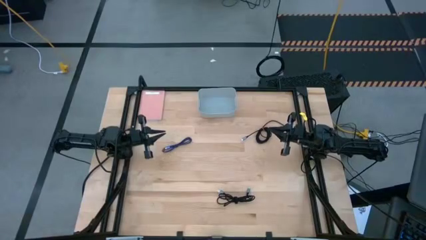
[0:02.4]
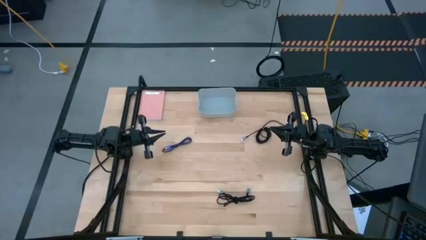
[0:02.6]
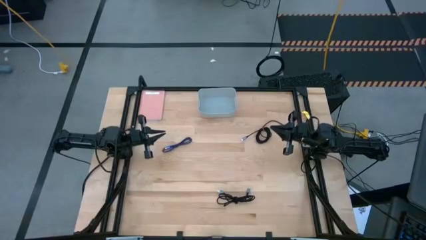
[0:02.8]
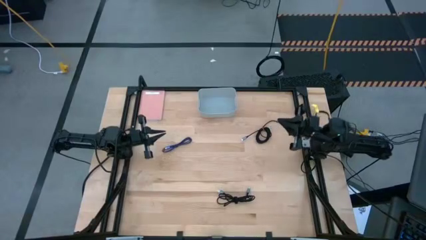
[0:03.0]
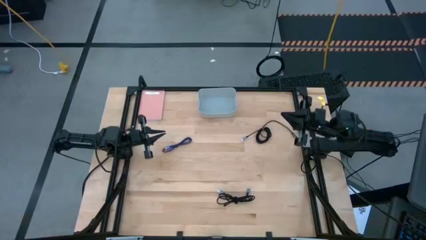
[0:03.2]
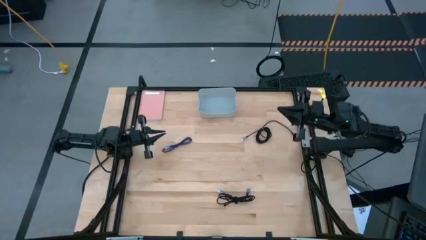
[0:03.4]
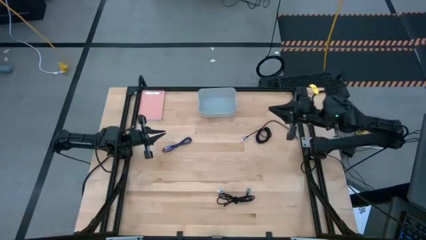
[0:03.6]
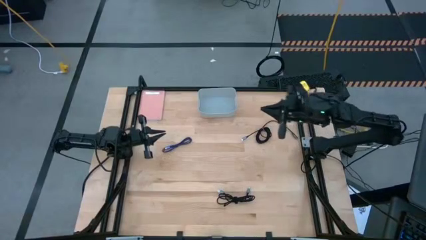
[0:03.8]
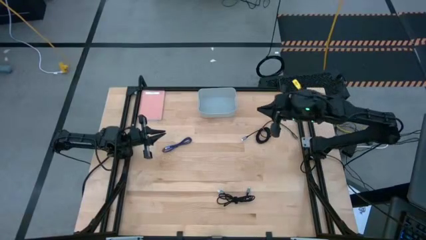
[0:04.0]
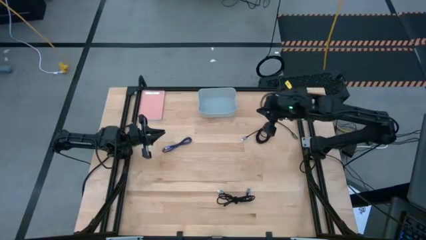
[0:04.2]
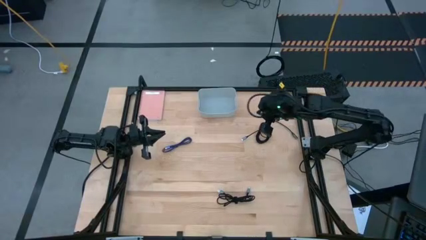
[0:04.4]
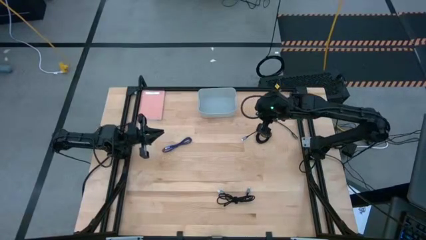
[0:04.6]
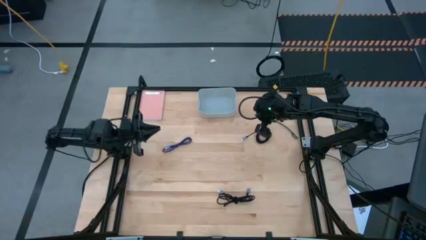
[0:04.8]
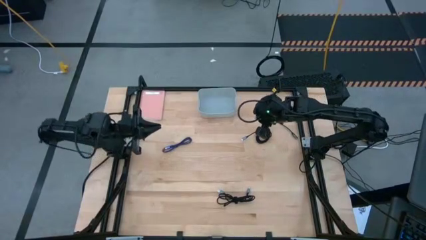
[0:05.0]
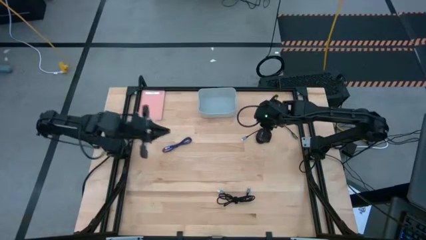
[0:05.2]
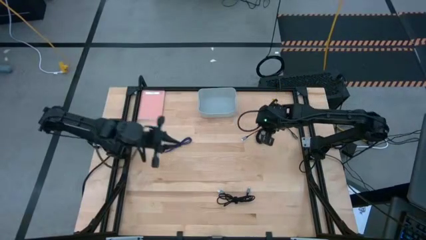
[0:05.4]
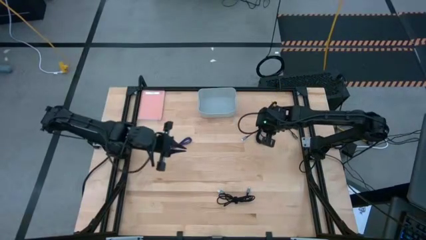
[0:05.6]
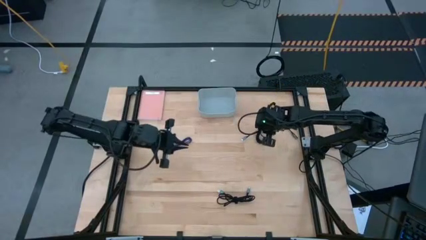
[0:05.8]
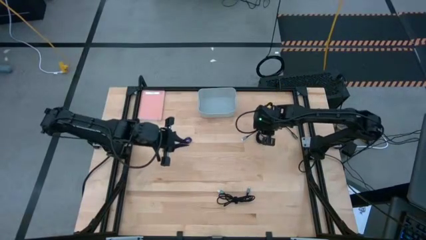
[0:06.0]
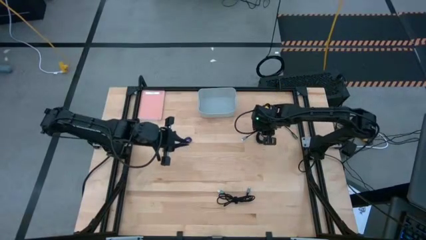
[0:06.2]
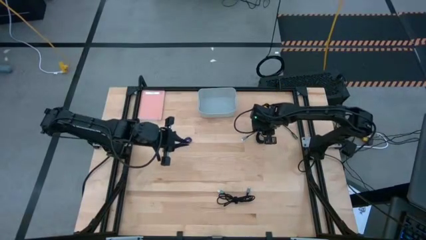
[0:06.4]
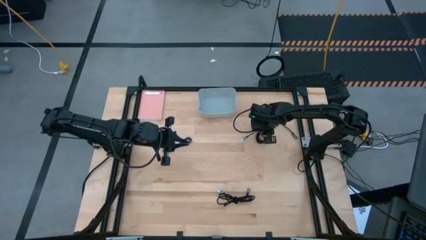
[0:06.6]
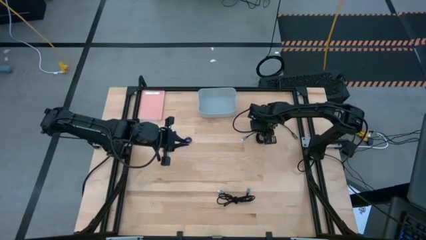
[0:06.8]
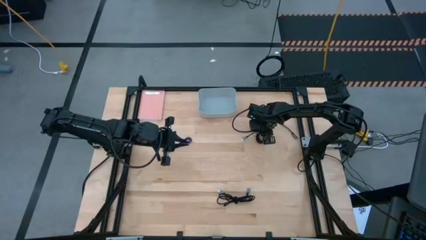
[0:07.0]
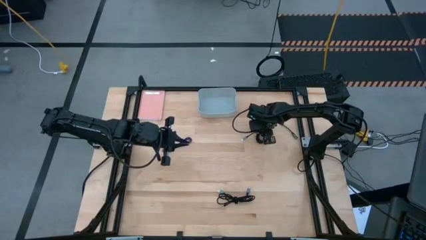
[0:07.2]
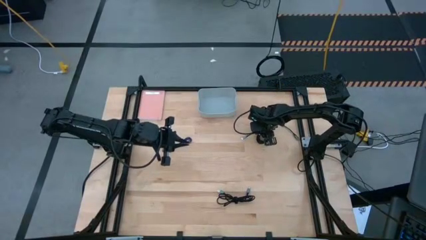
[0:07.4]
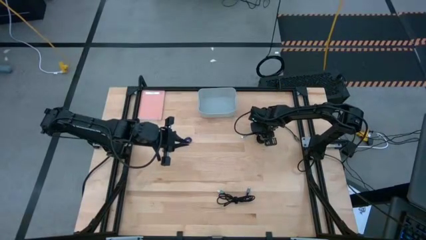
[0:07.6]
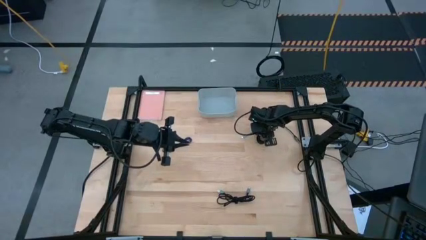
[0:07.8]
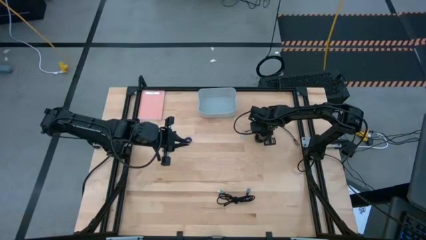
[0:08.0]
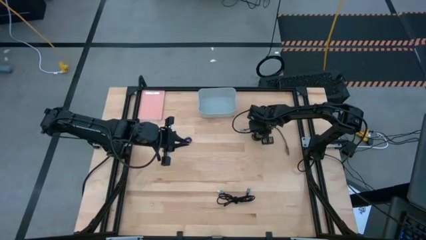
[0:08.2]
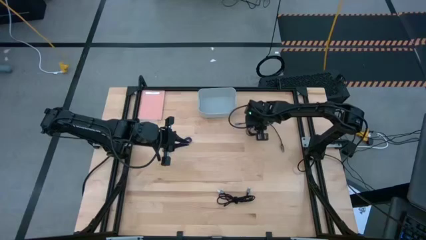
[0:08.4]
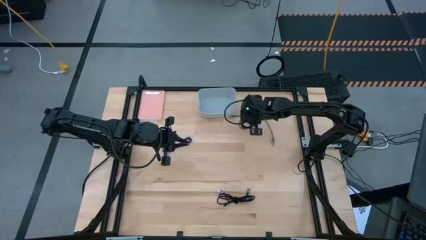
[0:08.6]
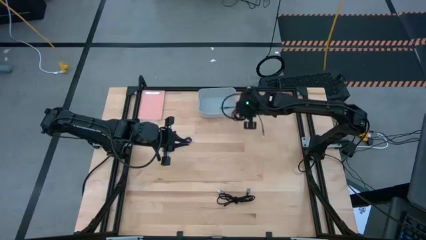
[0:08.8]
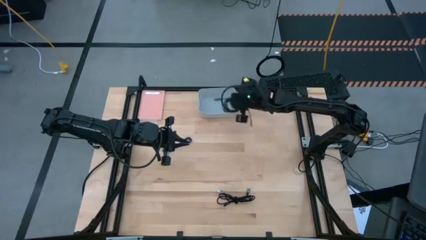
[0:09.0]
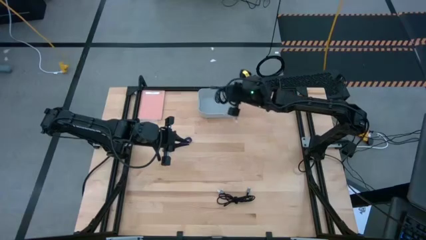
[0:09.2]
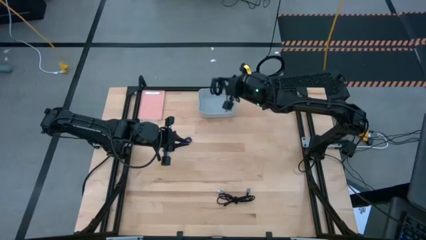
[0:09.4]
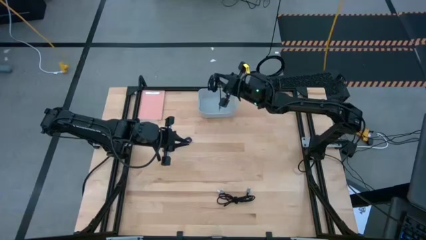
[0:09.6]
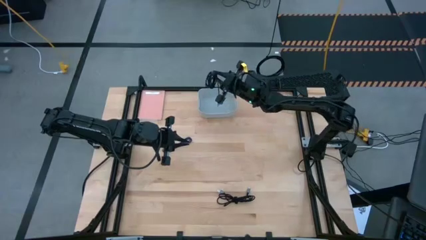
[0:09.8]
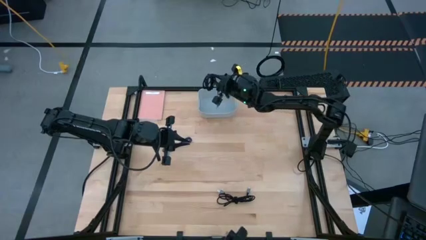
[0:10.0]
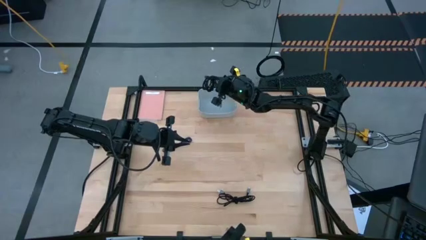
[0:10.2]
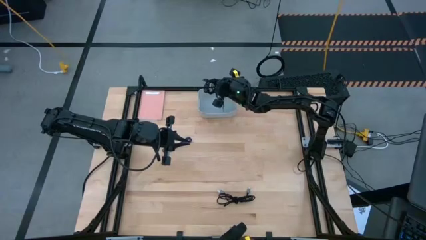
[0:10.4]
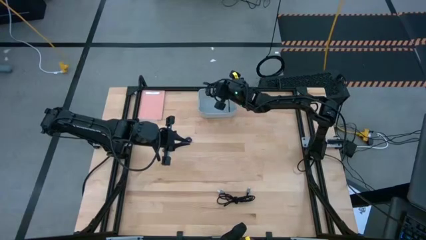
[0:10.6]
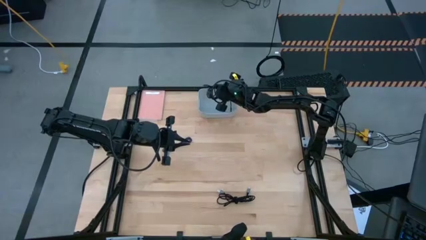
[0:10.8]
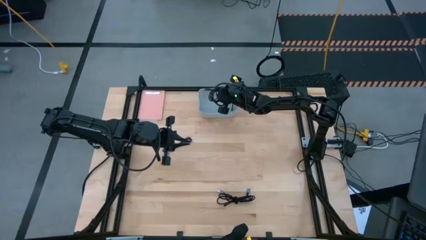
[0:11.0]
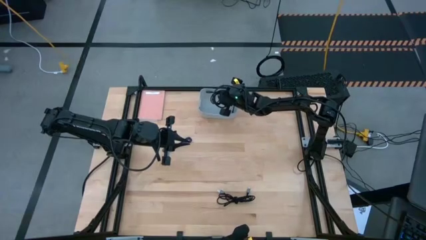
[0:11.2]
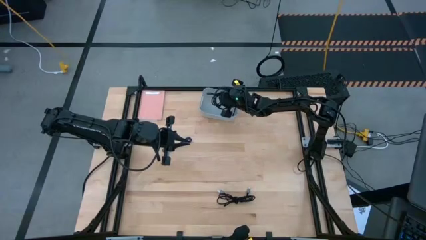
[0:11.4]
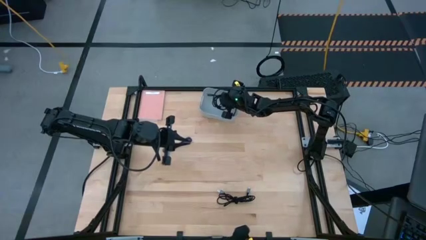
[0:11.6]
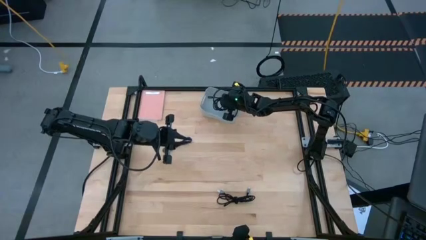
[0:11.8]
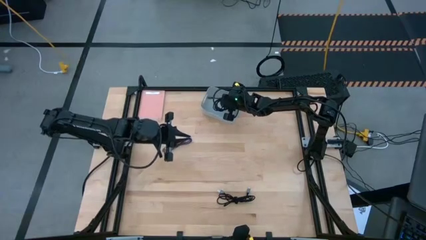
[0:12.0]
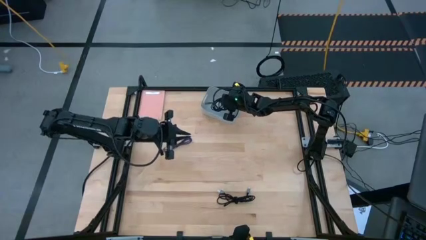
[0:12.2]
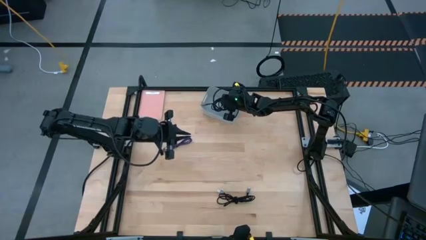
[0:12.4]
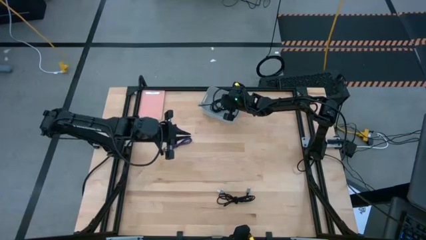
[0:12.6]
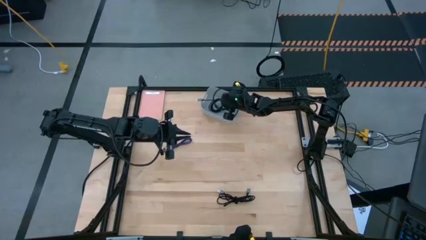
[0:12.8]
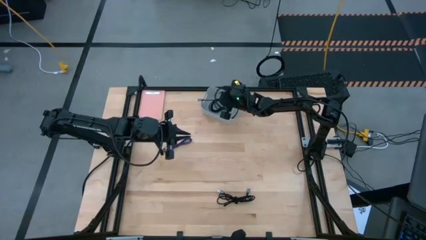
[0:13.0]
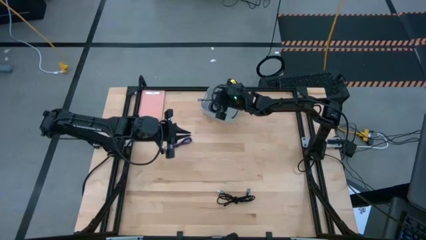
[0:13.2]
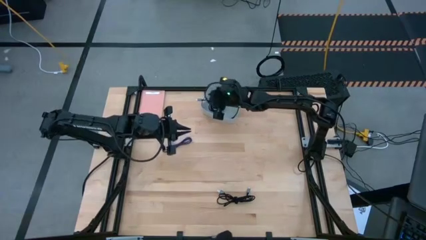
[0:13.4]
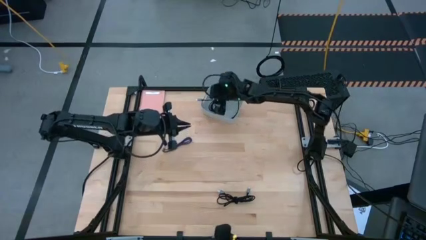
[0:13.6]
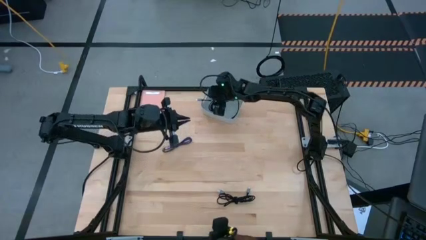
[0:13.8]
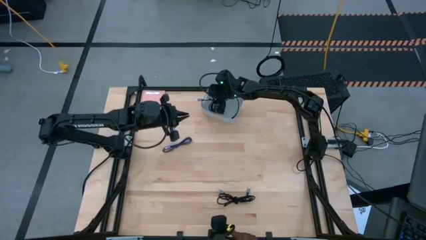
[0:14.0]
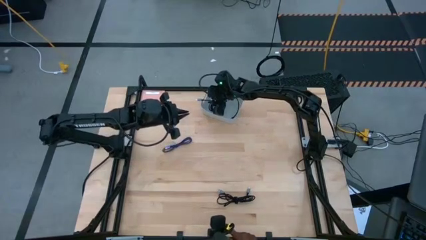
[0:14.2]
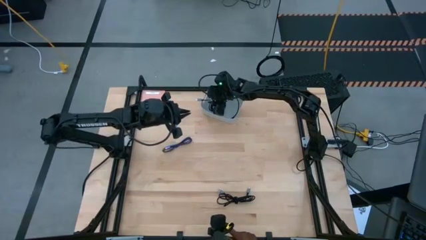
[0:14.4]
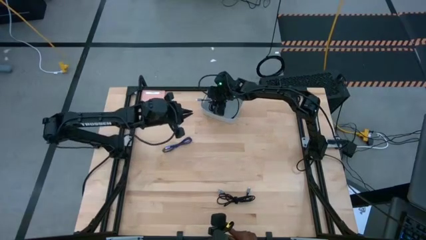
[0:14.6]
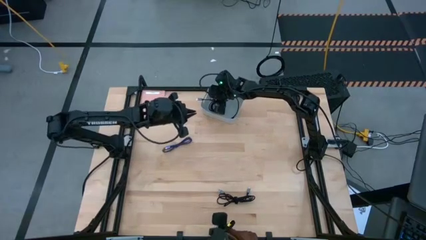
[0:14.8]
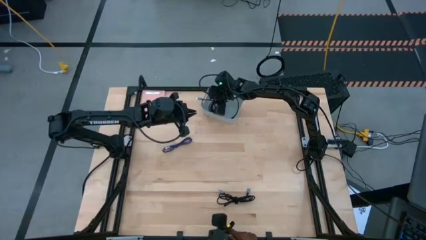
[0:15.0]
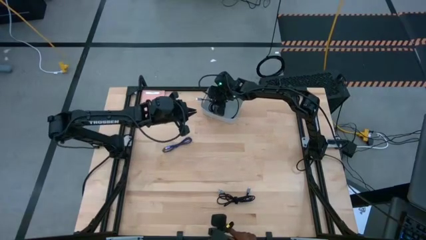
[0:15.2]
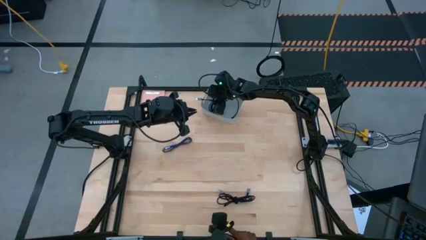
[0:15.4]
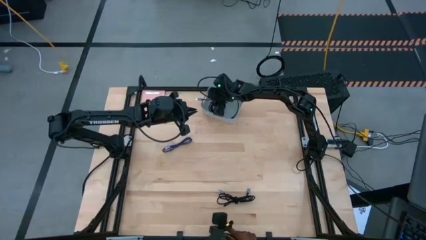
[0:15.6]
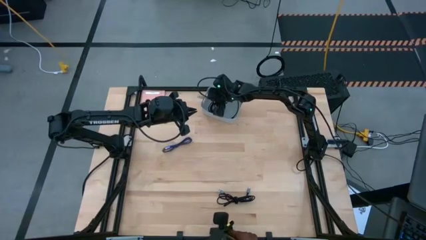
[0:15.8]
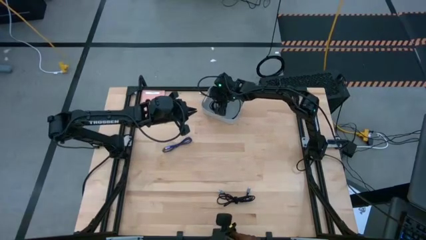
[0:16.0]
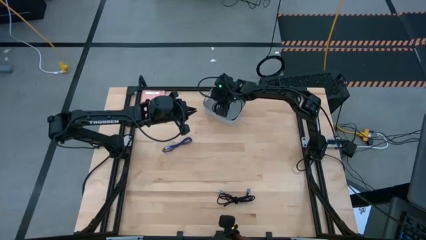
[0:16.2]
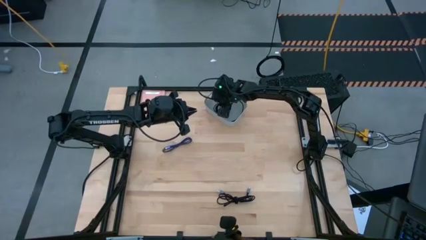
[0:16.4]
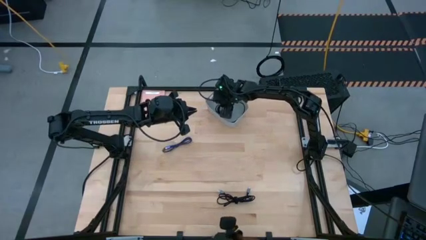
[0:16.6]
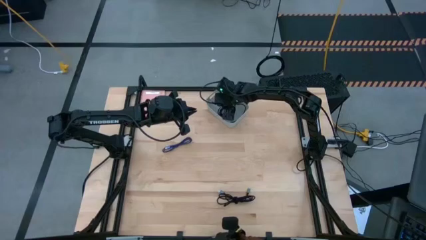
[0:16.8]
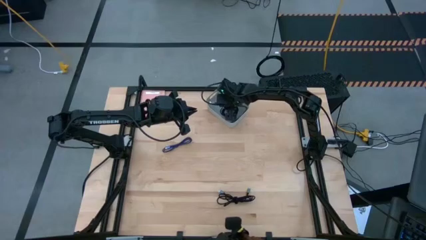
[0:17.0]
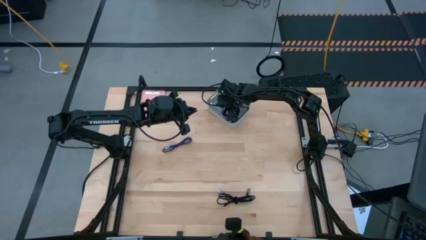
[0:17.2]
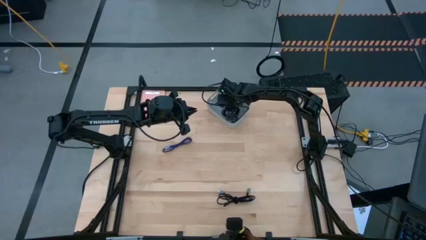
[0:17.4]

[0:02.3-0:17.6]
Task: Pick and place USB-C Cables
Put the top black charger cable into the gray bin

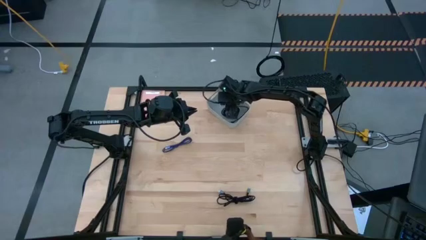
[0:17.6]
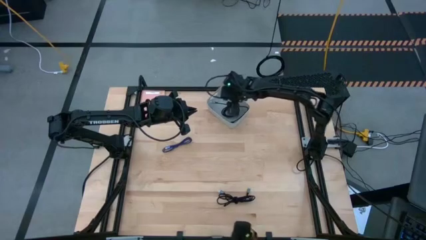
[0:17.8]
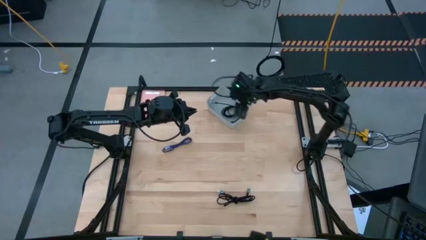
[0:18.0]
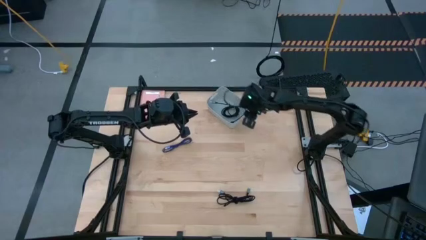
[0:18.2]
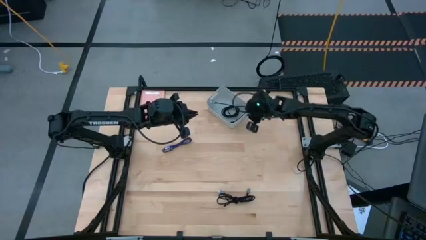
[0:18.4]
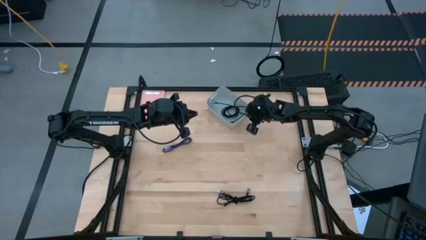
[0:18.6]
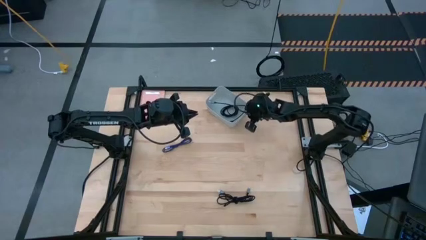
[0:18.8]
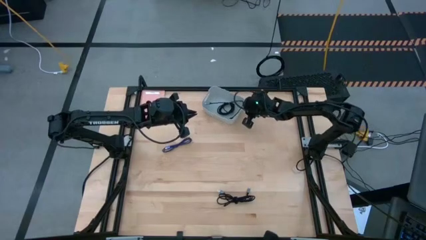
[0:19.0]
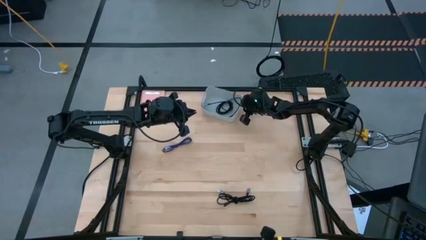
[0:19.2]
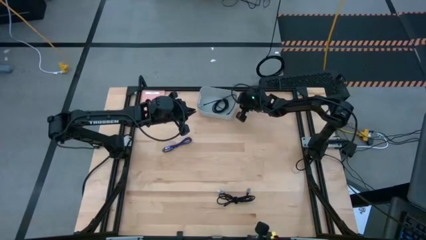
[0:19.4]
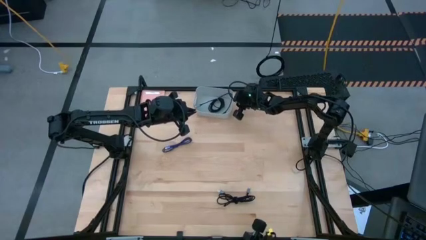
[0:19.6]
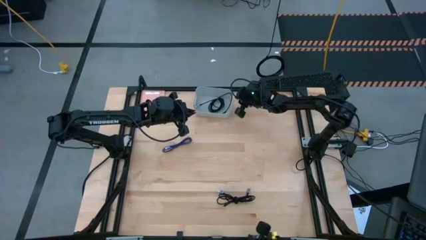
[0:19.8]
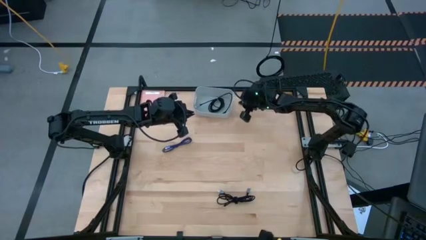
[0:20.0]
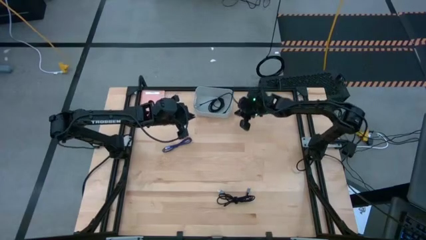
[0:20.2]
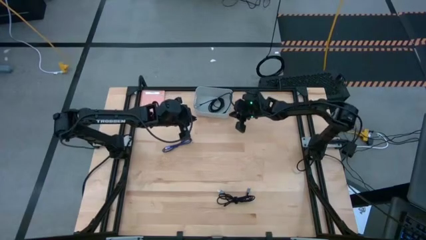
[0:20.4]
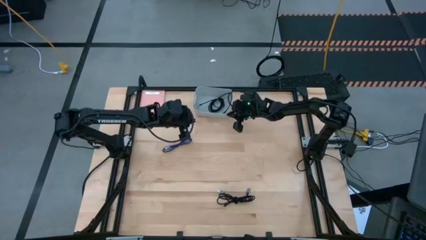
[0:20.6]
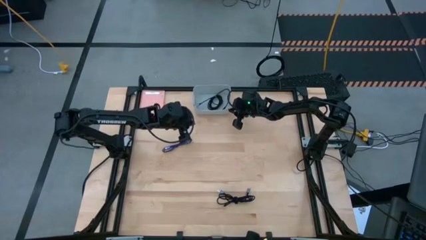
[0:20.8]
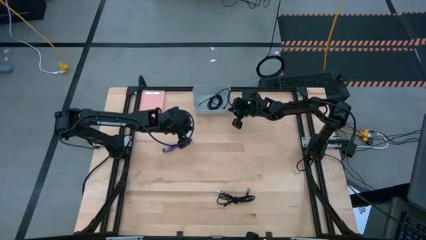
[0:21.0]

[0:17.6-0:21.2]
Adjust the gray bin
